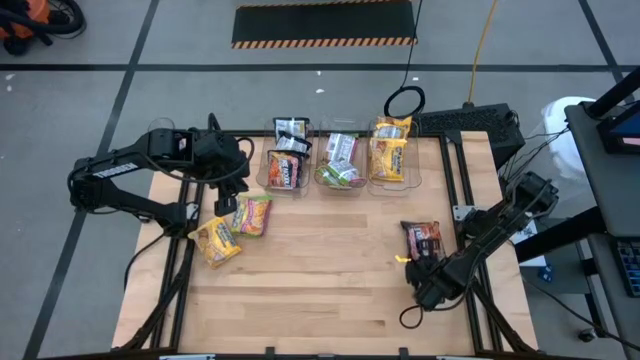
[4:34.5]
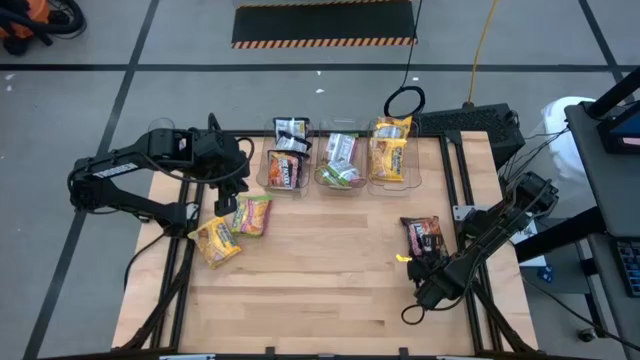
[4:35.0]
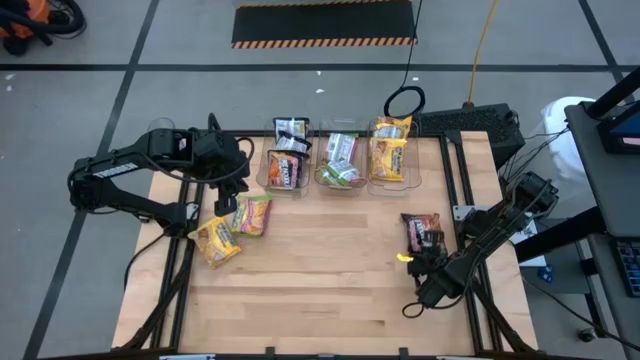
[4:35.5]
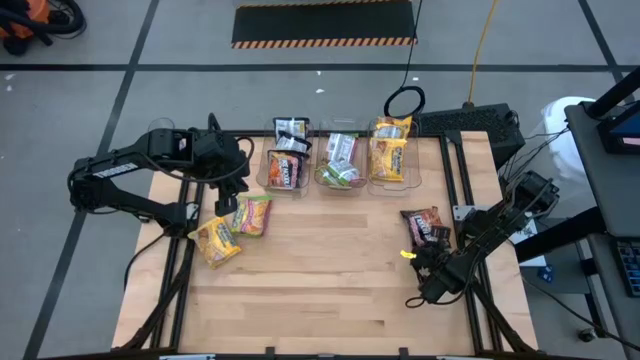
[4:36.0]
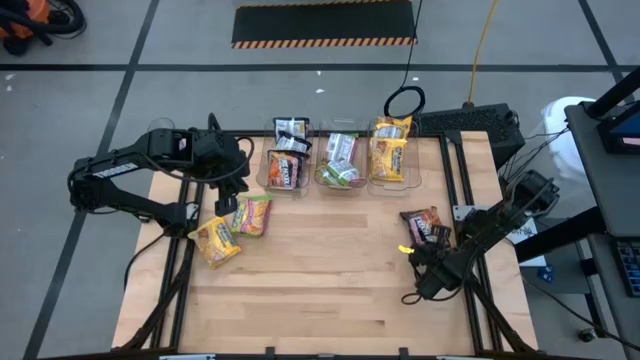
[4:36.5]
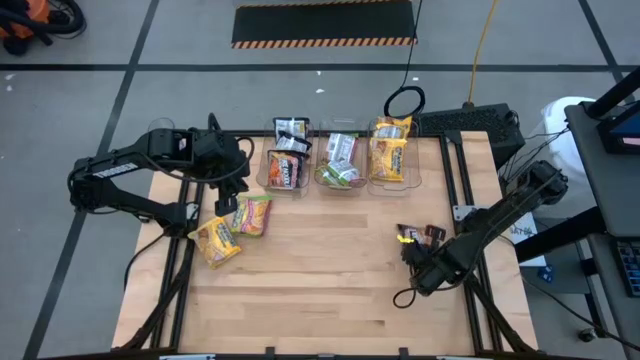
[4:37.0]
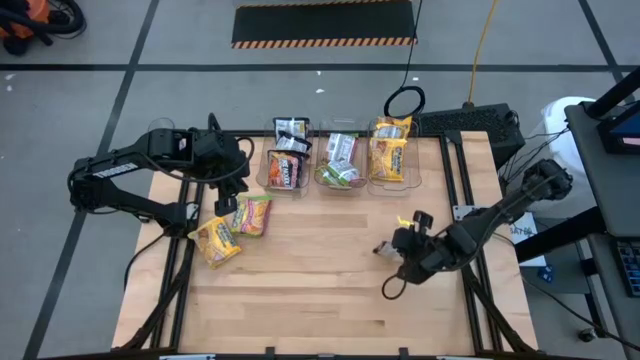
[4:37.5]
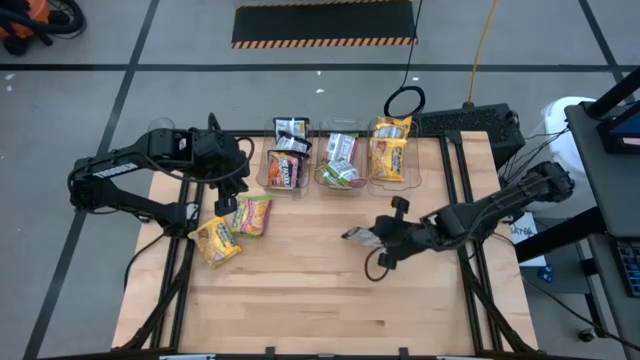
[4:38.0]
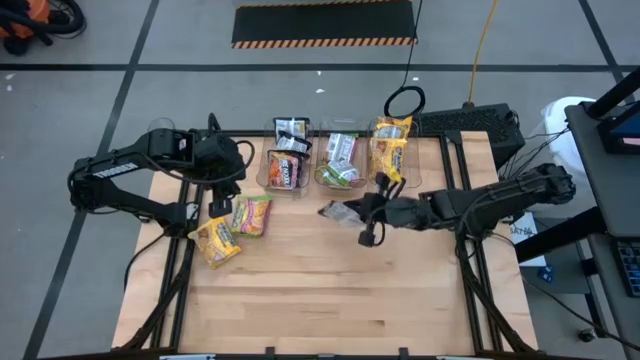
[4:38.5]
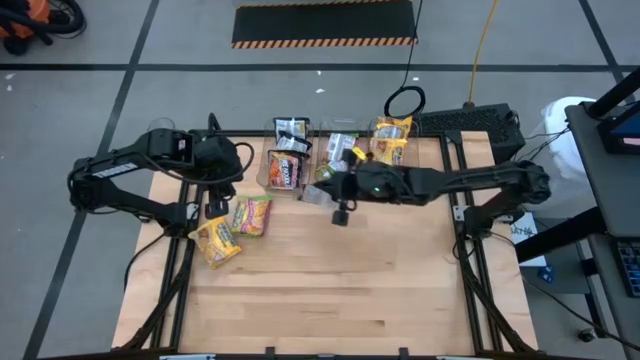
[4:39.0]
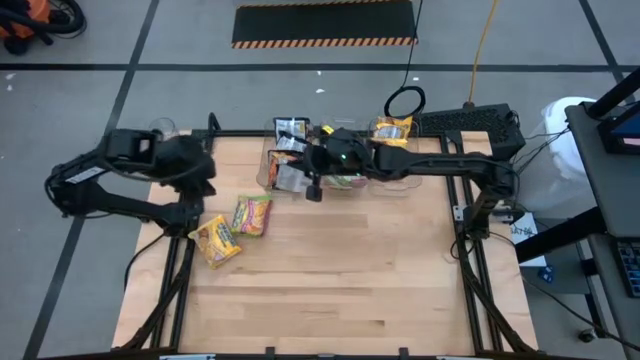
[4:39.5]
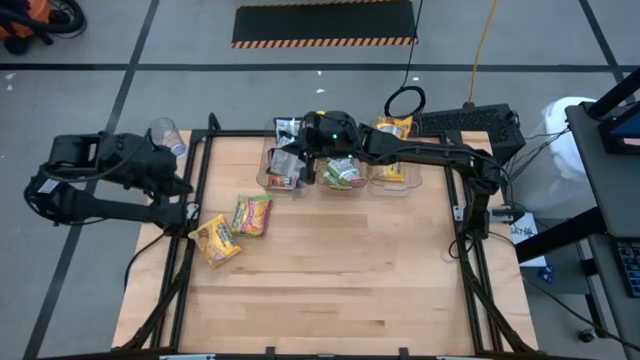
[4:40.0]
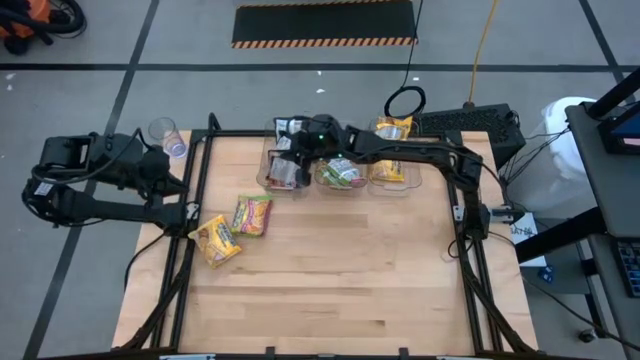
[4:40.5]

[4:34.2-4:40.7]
Task: Sort Maruchan noodles
Put the black noodle pack into the left transparent bin

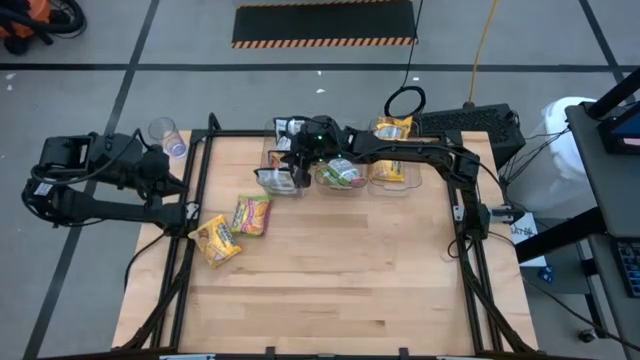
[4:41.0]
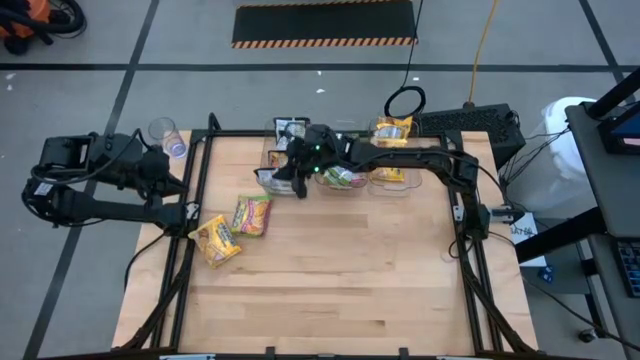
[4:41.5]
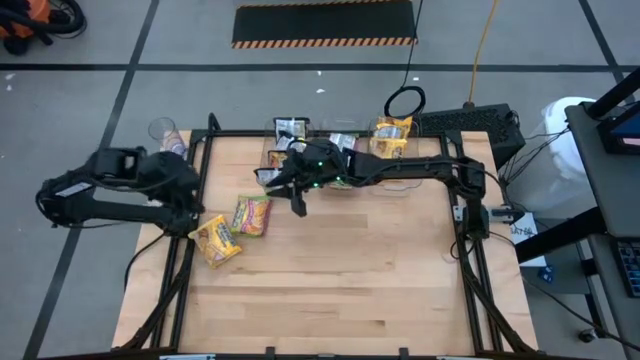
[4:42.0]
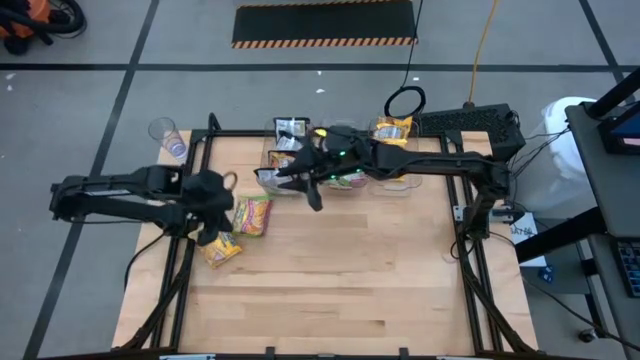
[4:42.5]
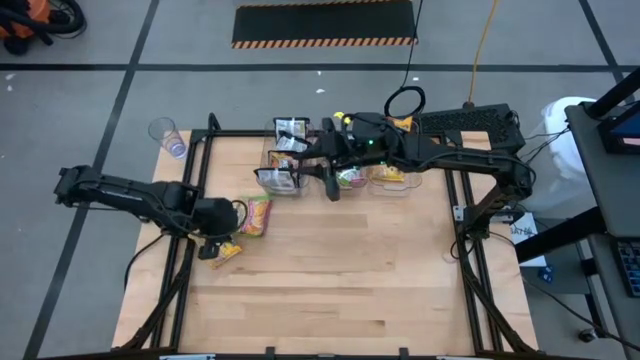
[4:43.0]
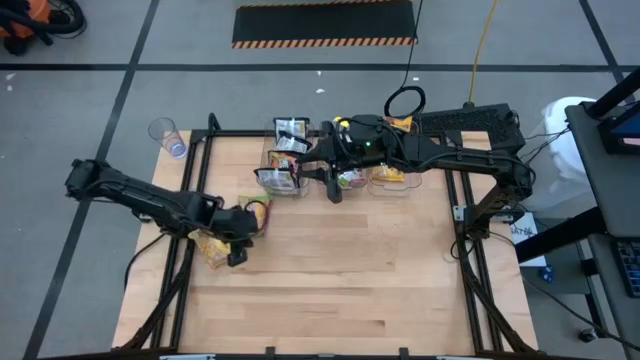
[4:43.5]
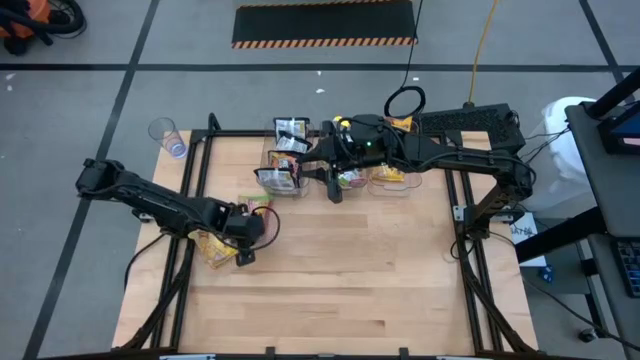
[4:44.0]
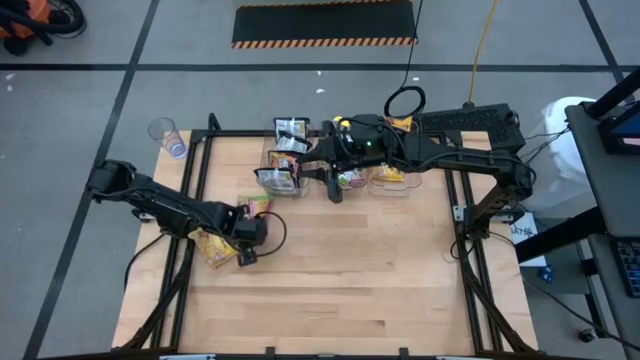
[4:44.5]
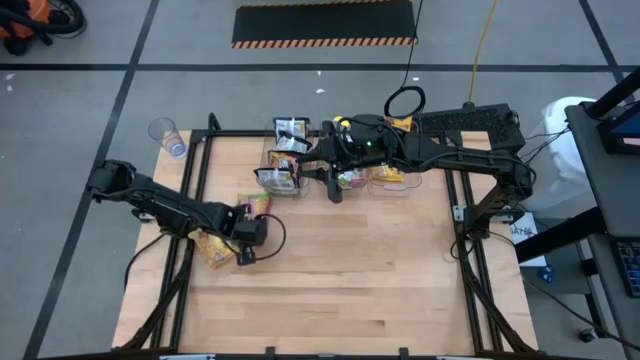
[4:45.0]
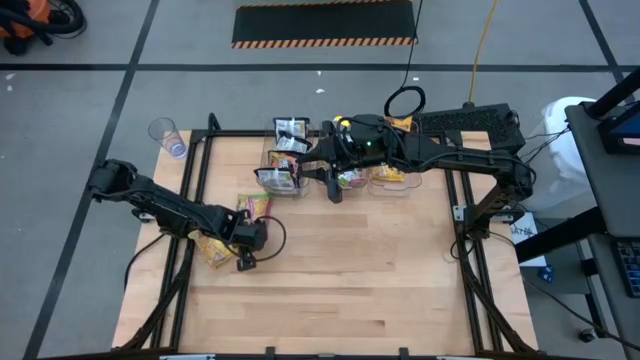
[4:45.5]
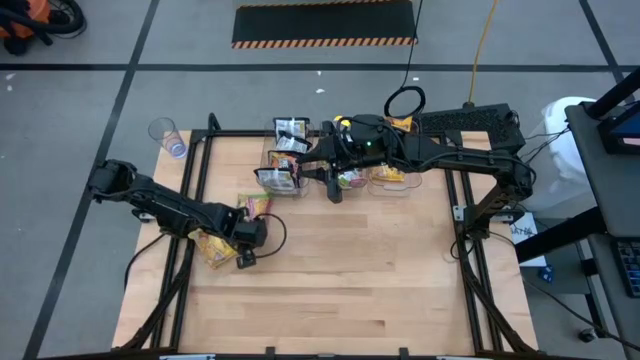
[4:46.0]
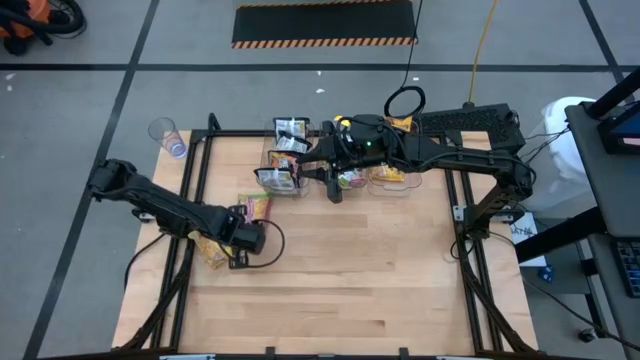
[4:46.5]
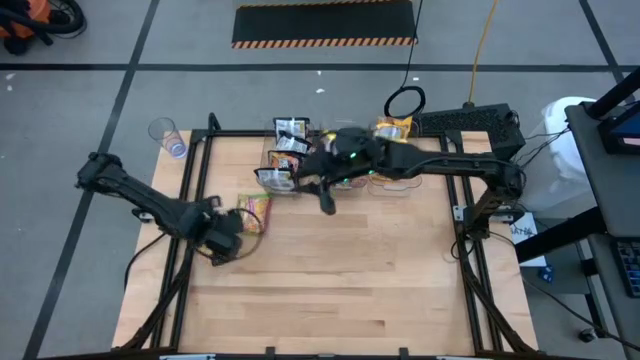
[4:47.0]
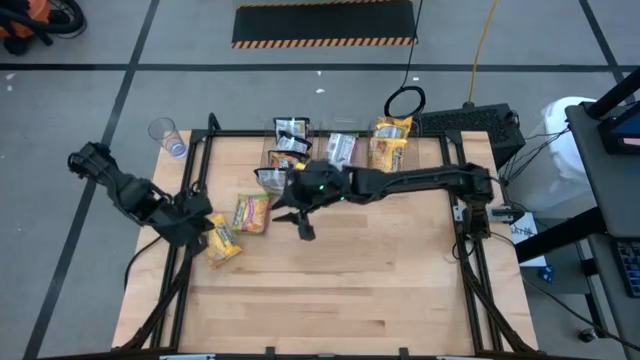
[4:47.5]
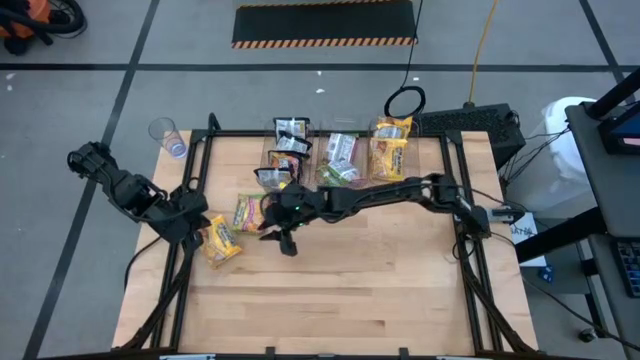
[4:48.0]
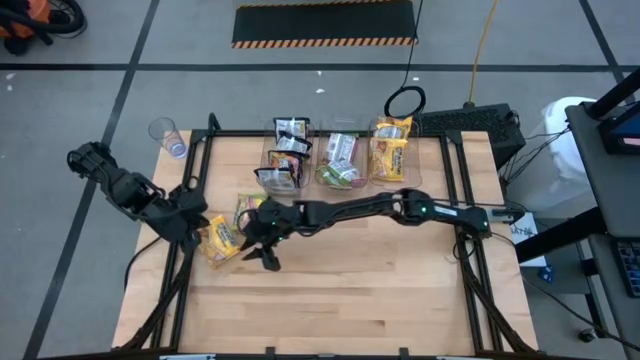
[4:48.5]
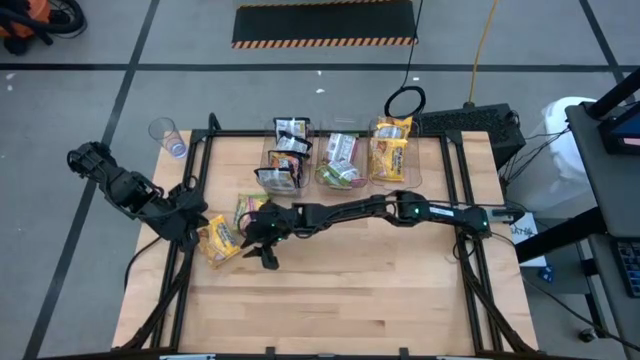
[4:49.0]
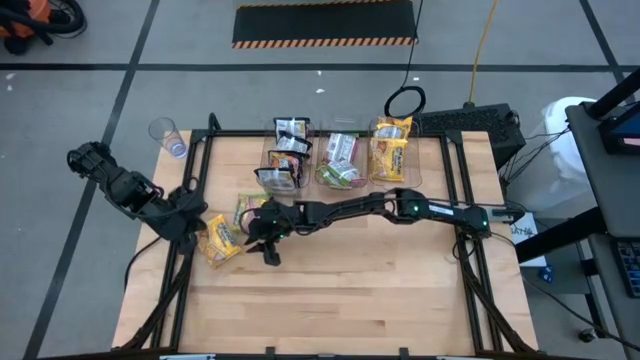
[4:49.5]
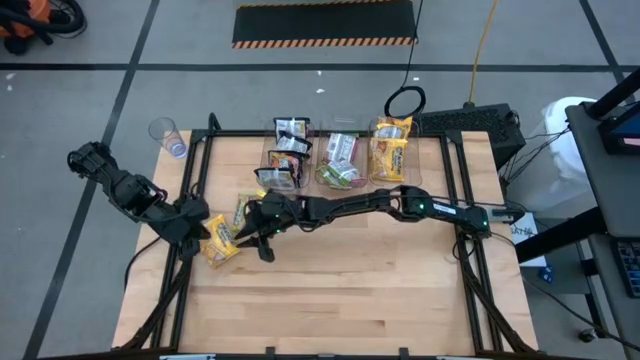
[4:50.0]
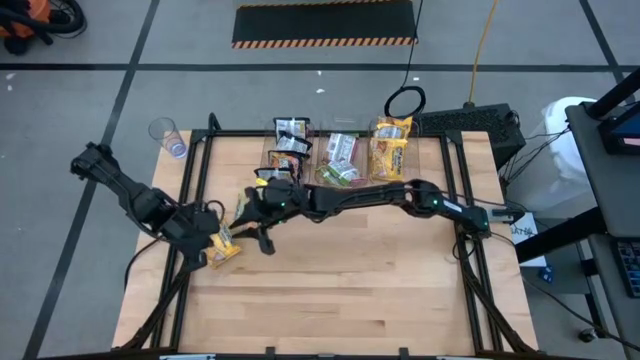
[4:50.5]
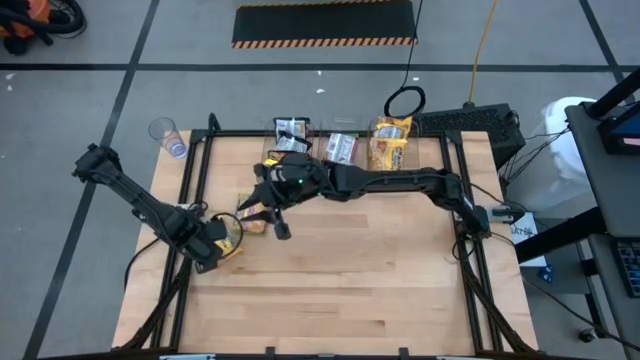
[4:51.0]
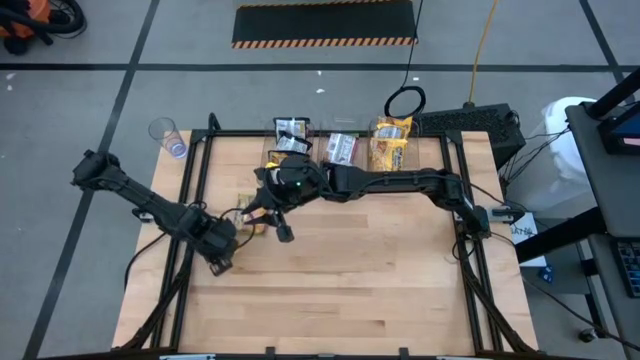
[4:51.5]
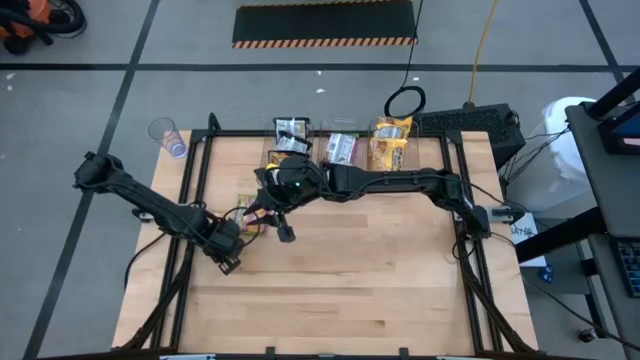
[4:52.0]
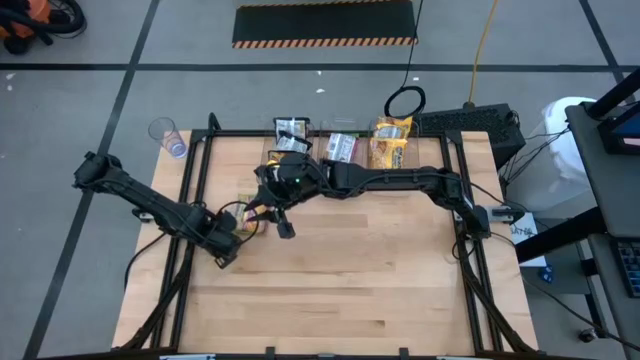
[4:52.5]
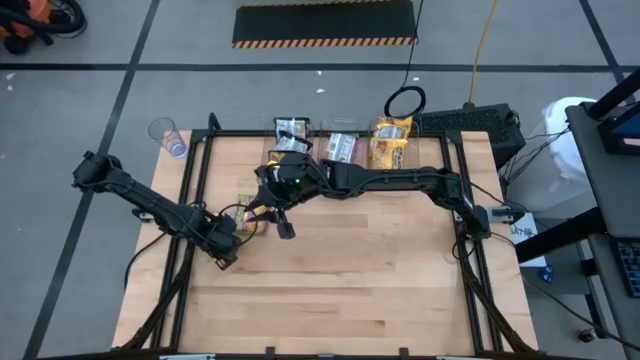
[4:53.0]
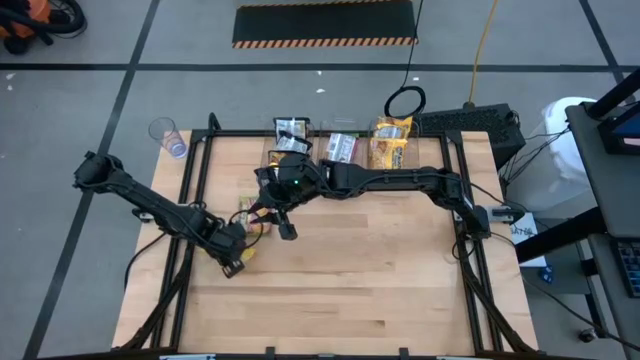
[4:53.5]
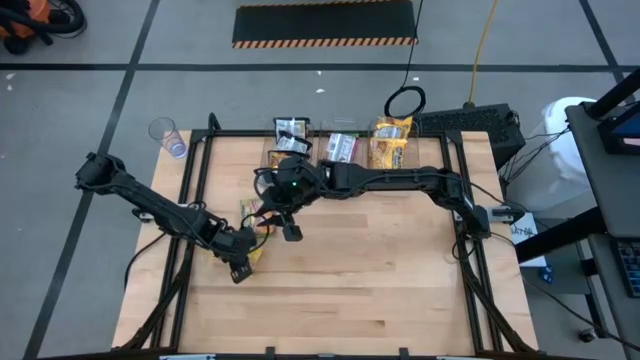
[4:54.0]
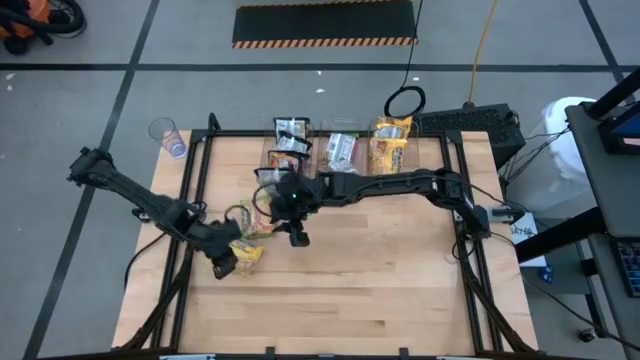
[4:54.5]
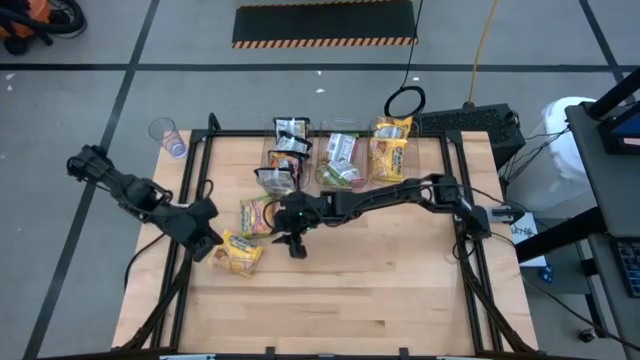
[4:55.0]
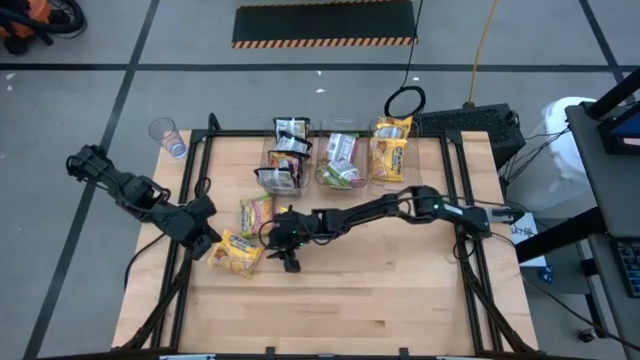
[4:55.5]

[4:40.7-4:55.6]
Put the yellow noodle pack into the right transparent bin
